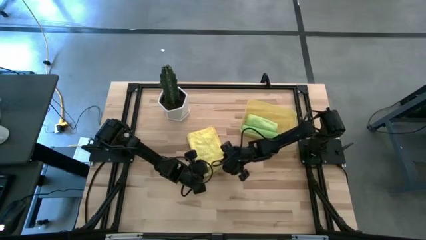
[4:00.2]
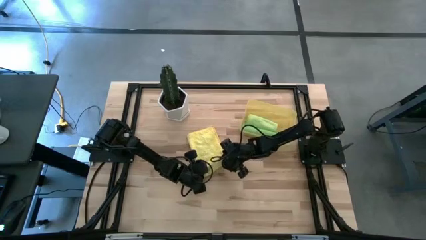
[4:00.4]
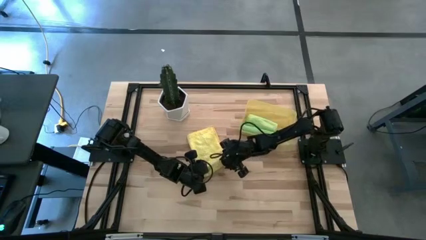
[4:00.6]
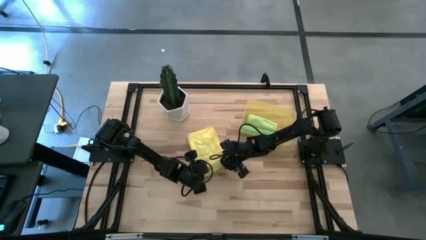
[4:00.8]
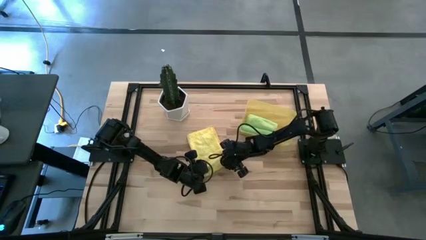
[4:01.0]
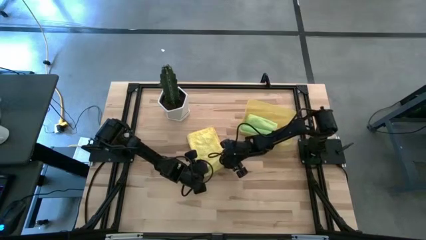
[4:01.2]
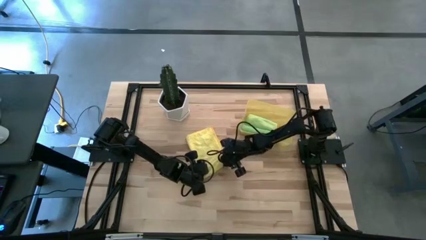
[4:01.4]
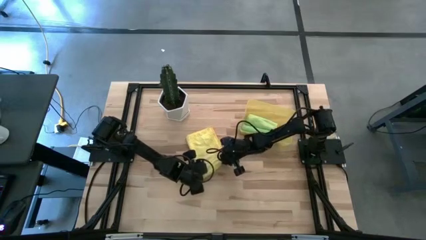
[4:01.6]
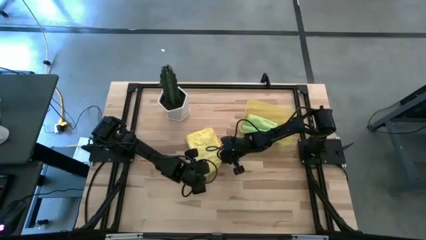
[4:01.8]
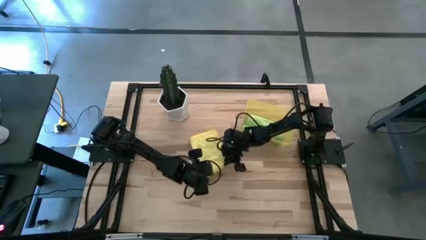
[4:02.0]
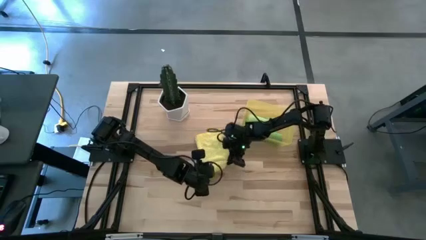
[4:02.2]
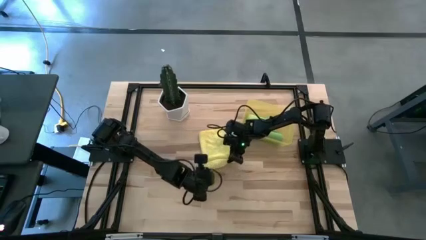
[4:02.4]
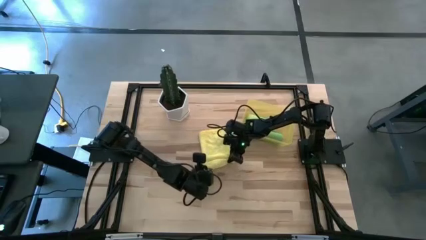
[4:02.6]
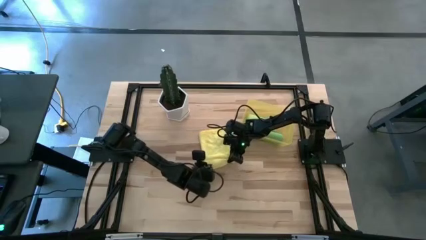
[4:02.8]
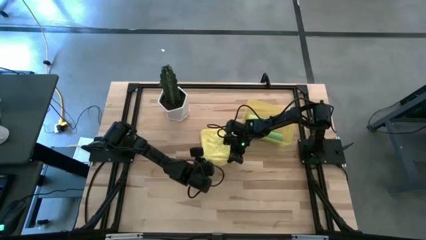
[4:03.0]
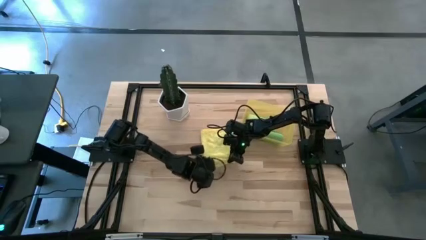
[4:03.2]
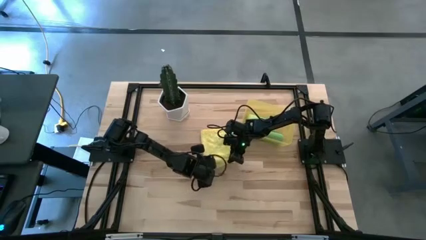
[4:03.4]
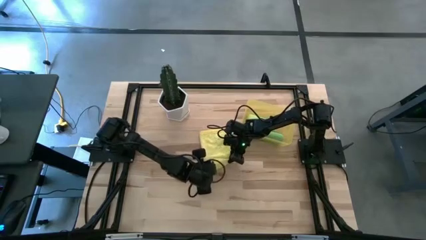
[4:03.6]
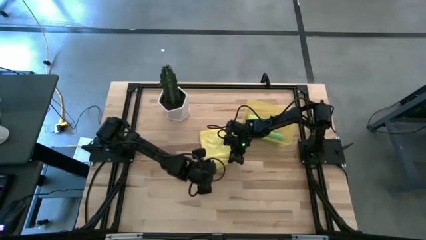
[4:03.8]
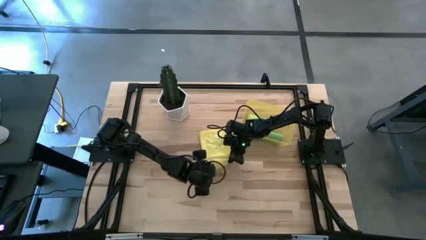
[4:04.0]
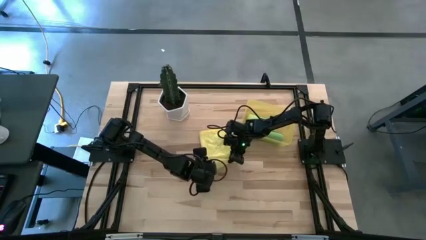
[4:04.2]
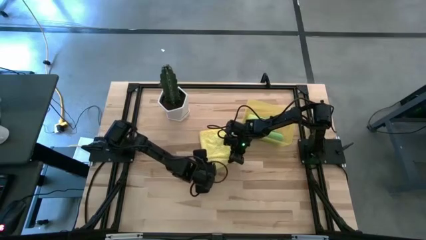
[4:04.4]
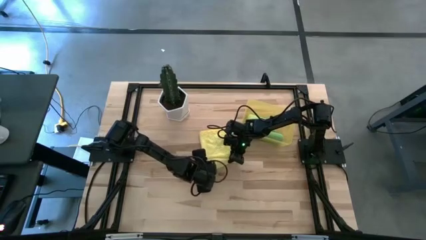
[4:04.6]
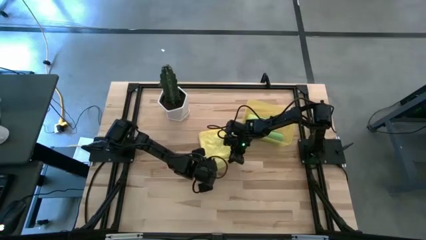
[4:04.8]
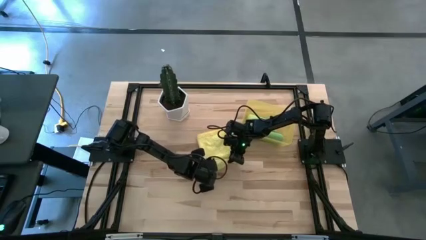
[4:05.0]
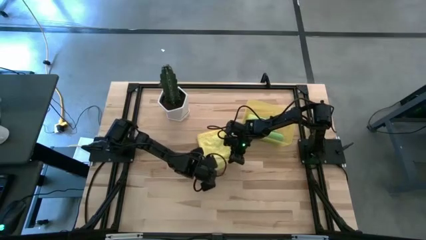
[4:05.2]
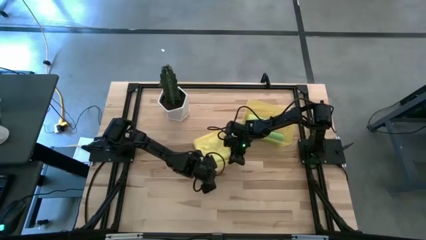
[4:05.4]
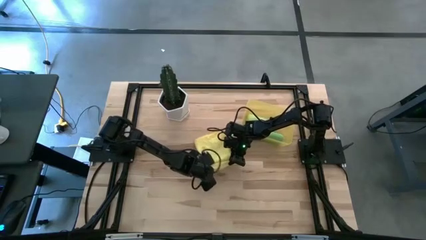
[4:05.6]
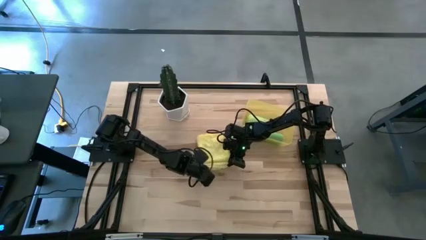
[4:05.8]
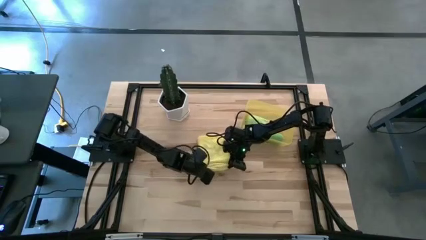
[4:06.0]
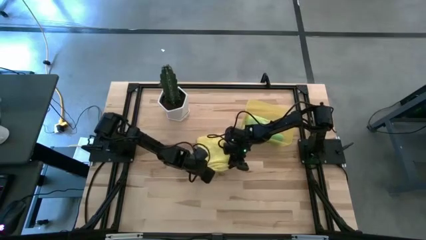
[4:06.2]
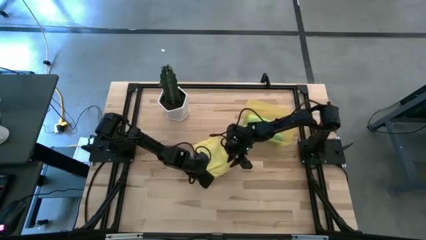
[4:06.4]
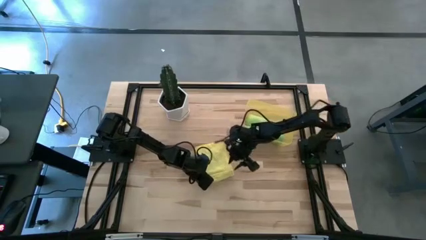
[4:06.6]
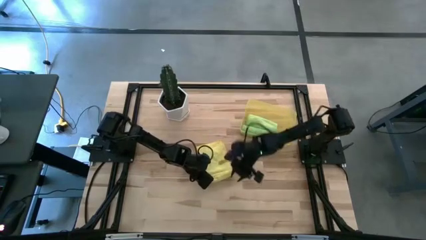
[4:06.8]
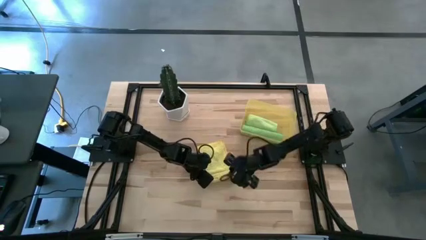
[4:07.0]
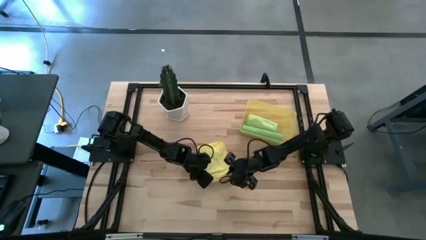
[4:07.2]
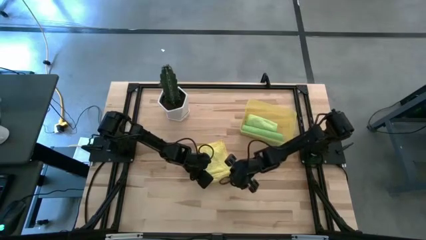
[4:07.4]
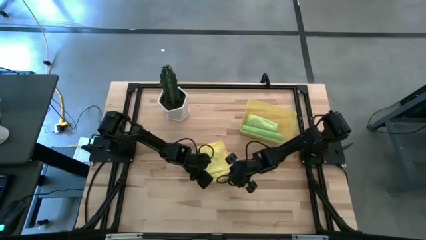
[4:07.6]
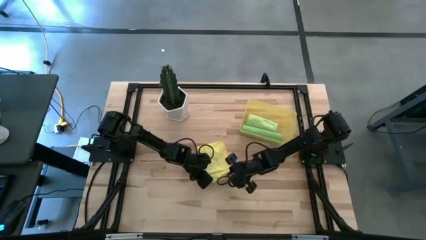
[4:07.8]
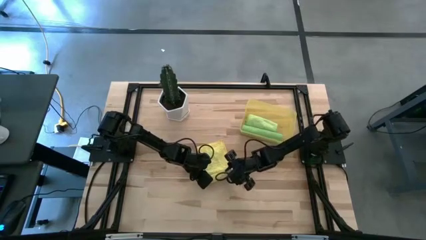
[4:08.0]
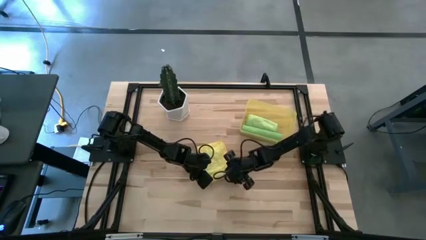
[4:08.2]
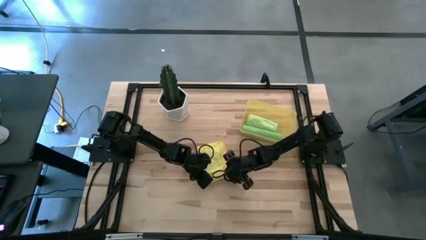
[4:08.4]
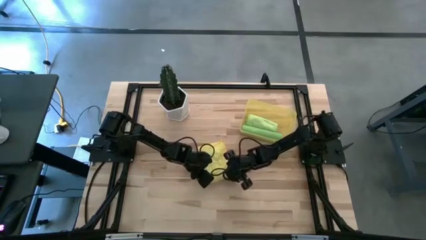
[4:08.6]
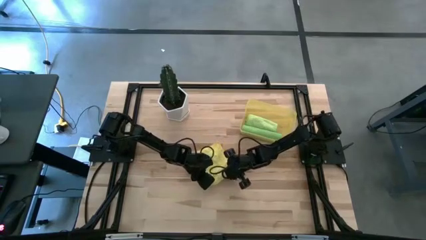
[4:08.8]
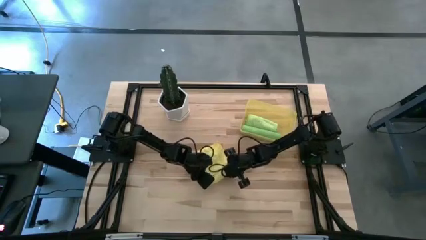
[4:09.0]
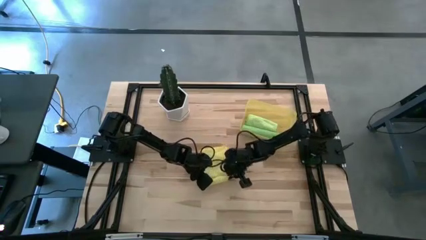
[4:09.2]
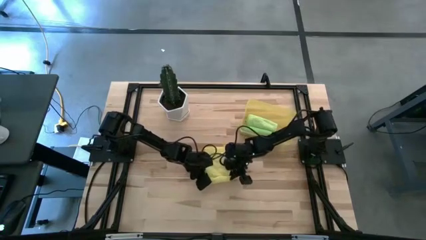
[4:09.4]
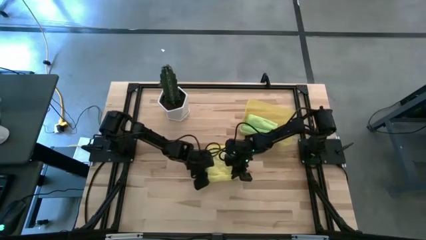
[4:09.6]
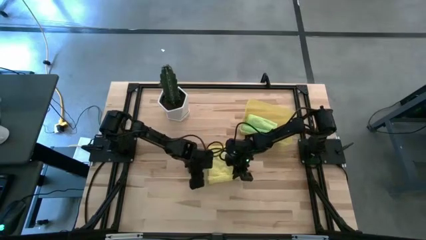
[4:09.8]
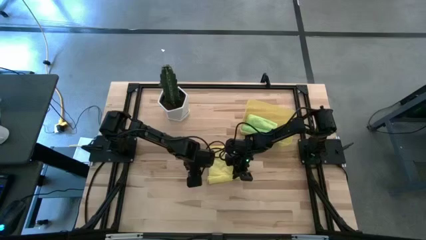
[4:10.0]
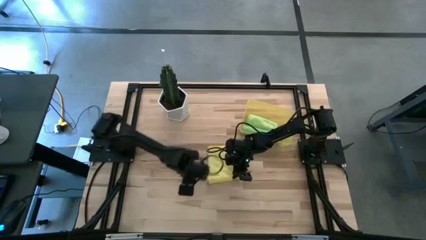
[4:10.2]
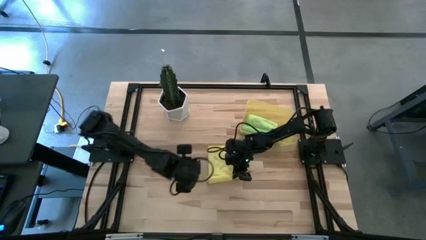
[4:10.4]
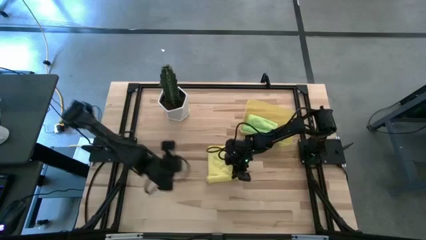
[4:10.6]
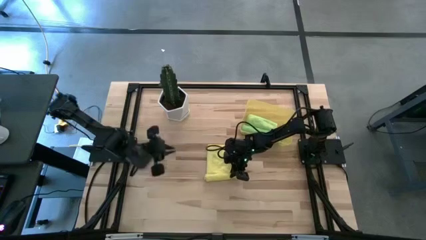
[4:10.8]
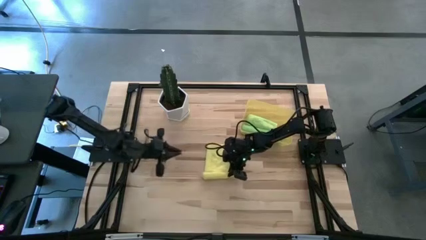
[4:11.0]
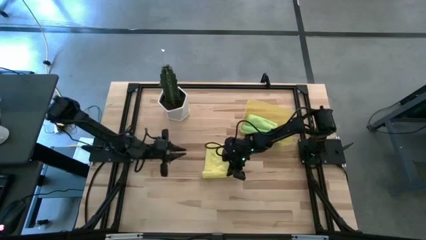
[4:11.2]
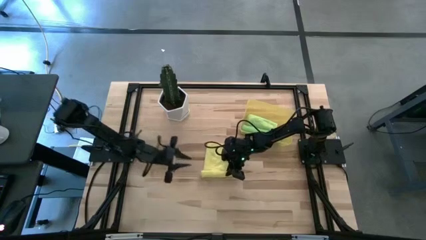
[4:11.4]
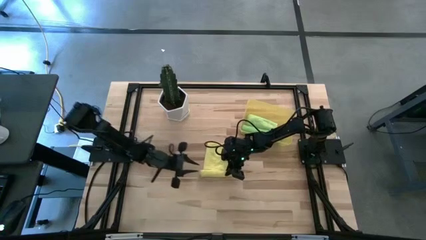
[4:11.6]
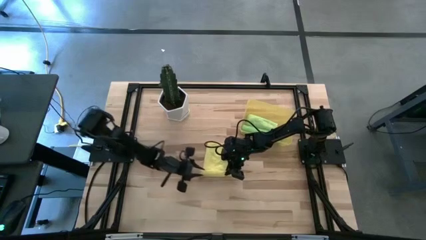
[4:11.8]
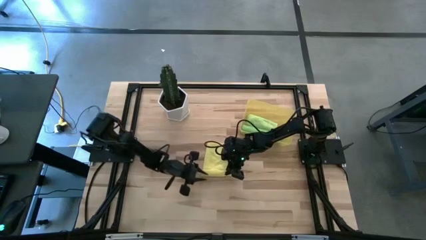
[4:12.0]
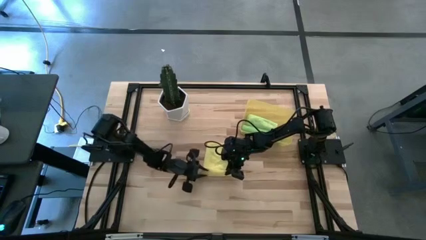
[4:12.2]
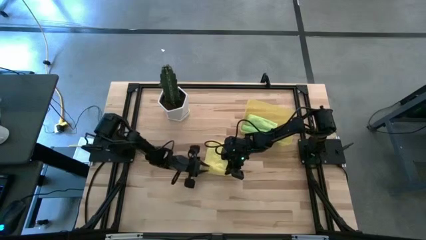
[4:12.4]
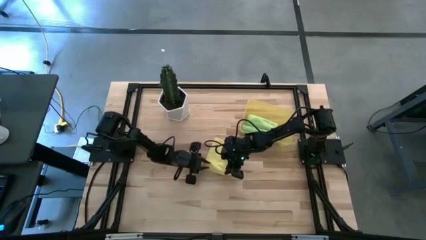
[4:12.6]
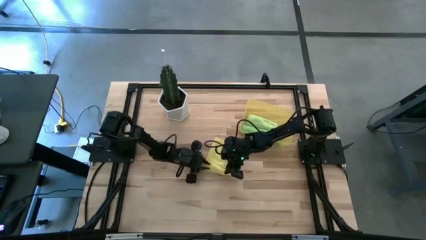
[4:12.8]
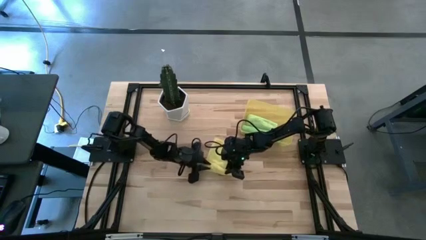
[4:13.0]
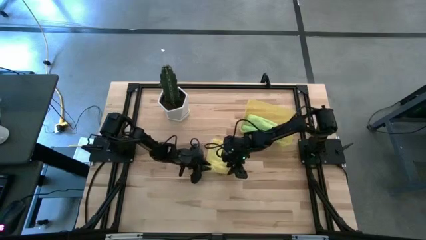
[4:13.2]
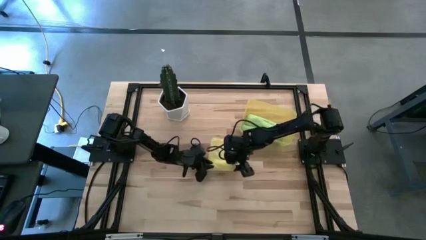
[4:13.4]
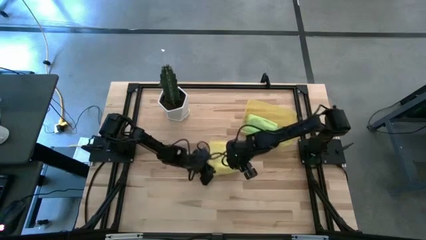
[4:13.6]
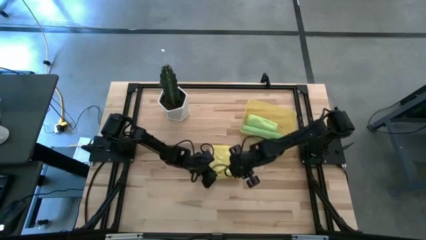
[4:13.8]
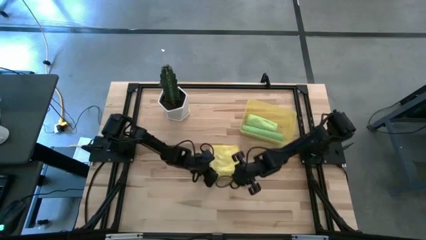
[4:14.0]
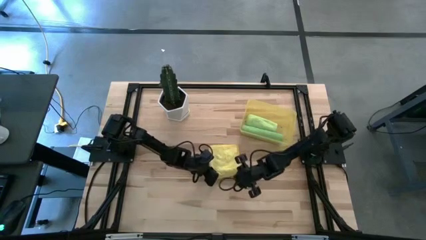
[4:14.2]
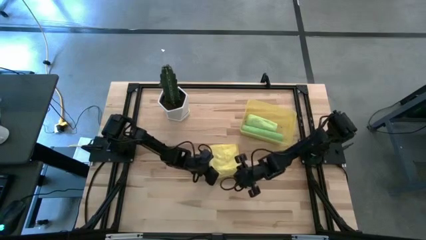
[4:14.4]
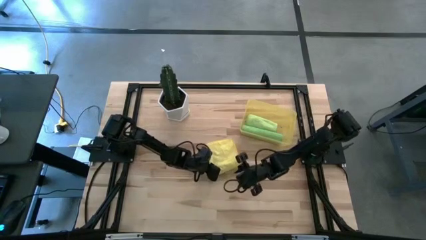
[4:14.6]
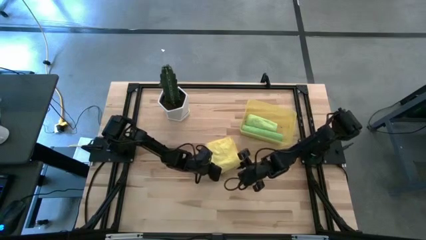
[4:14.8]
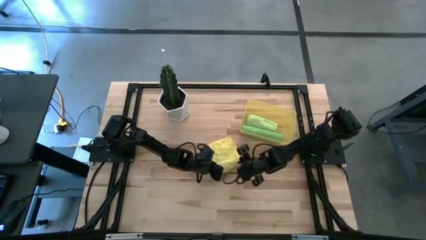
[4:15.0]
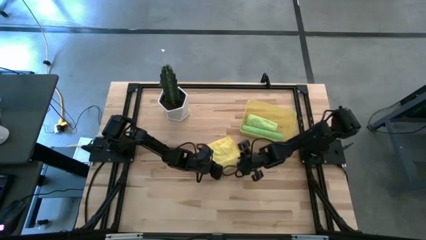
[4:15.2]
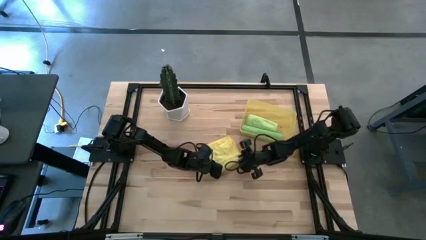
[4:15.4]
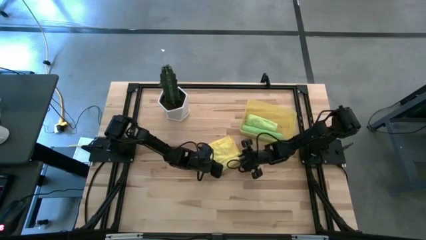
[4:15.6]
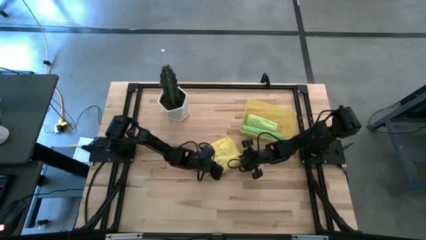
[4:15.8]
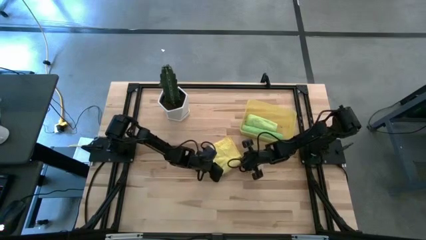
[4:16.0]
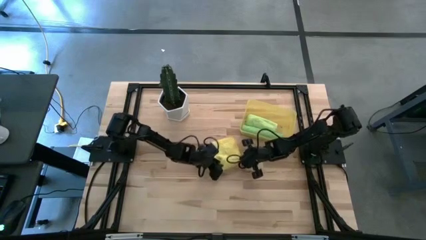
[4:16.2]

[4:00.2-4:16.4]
Task: Roll microfiber towels into tight, uniform cylinder then place into a basket
Roll the yellow microfiber cloth
